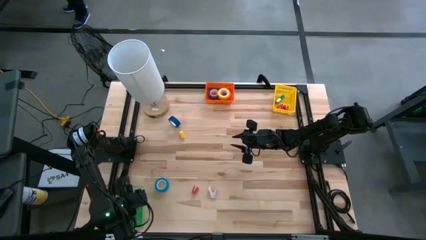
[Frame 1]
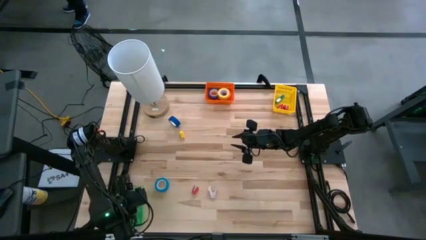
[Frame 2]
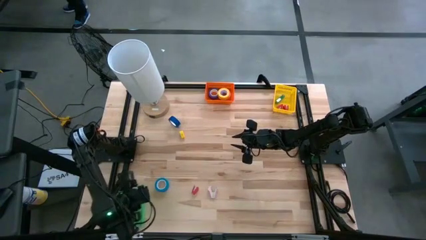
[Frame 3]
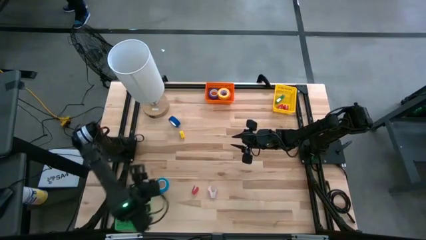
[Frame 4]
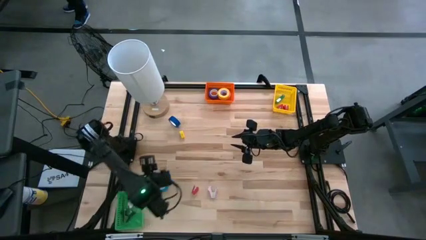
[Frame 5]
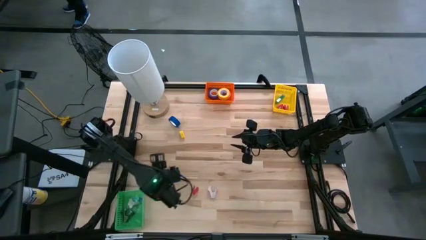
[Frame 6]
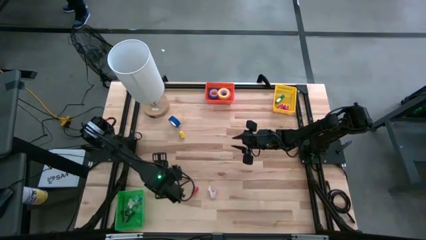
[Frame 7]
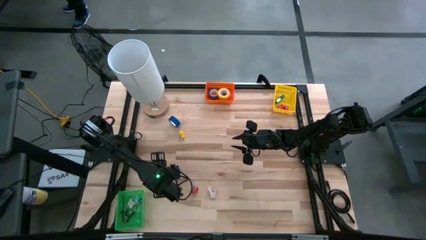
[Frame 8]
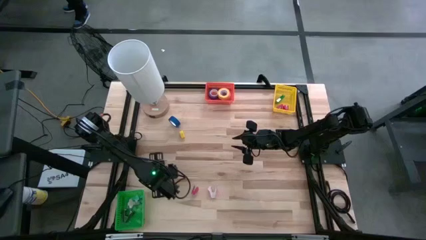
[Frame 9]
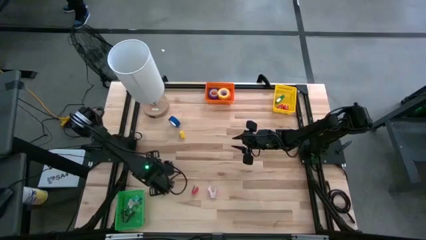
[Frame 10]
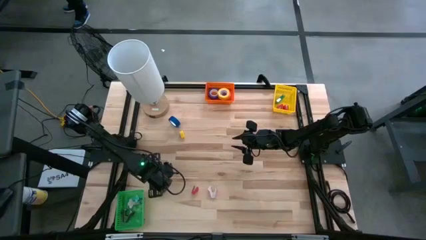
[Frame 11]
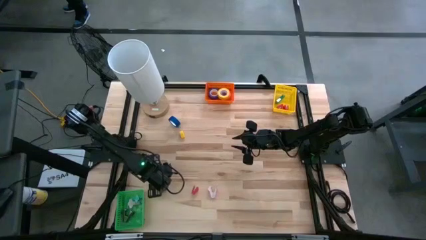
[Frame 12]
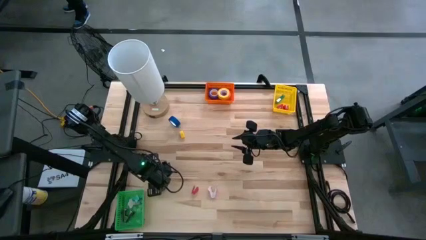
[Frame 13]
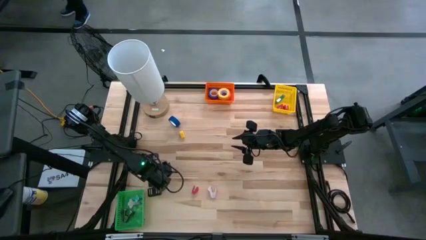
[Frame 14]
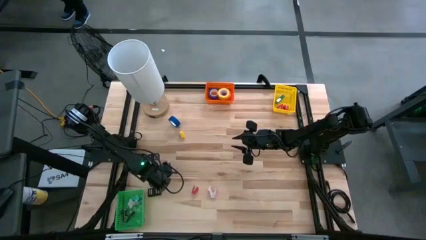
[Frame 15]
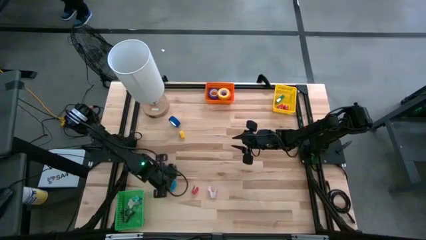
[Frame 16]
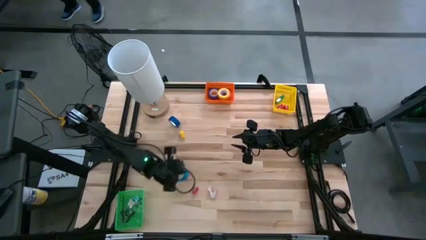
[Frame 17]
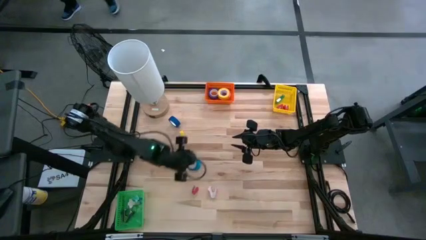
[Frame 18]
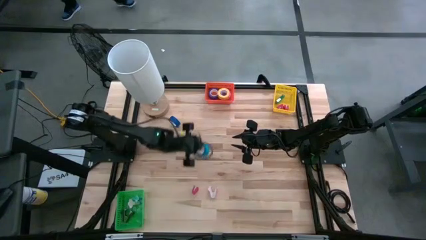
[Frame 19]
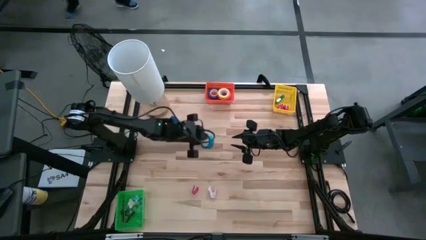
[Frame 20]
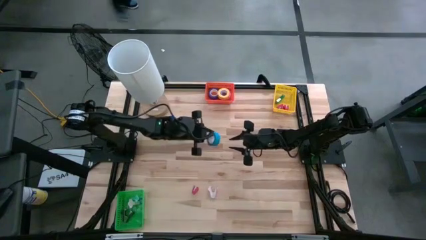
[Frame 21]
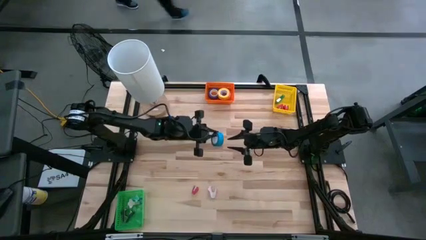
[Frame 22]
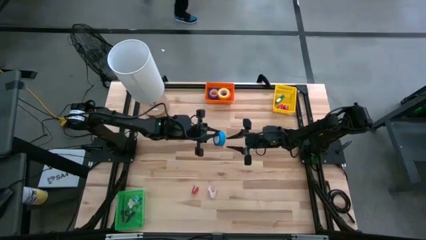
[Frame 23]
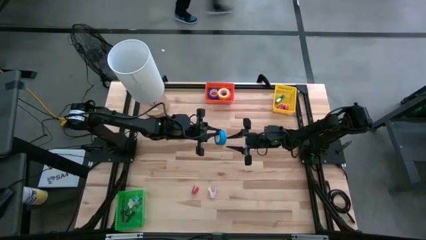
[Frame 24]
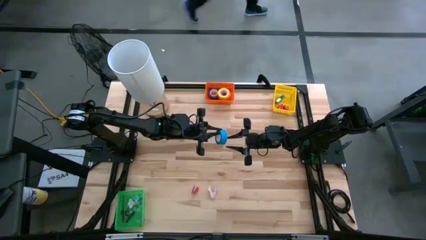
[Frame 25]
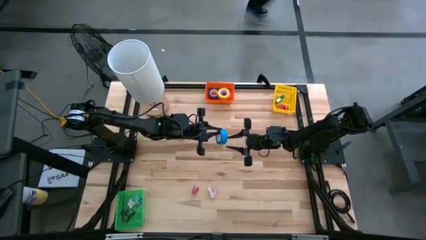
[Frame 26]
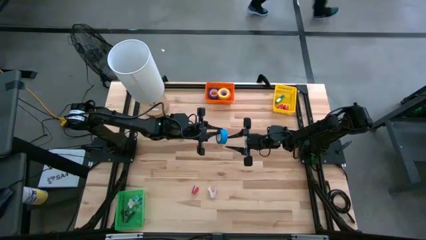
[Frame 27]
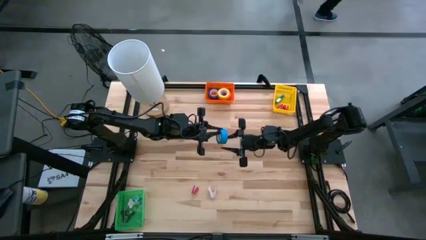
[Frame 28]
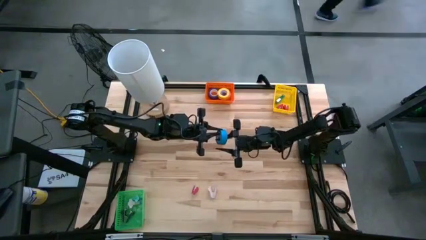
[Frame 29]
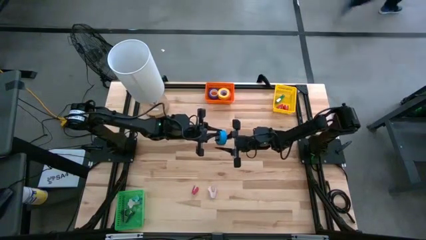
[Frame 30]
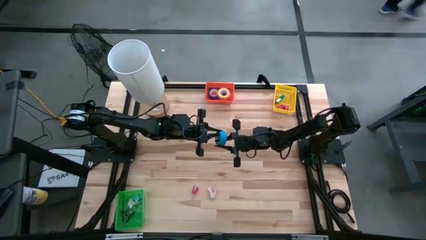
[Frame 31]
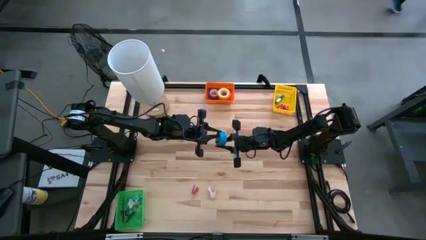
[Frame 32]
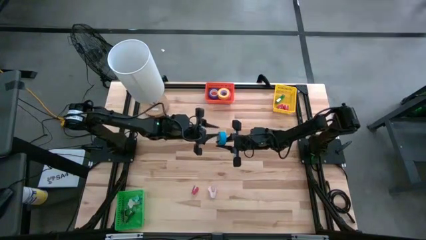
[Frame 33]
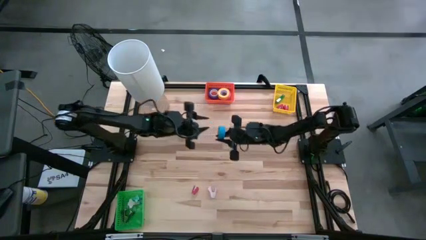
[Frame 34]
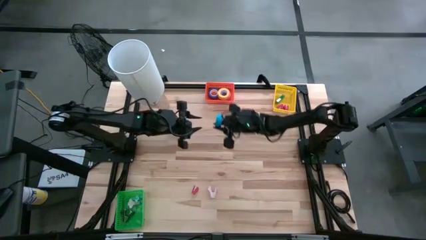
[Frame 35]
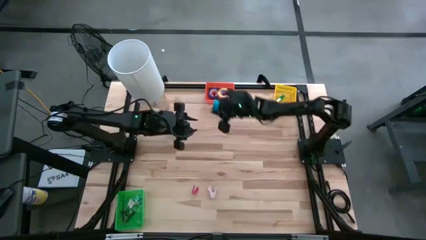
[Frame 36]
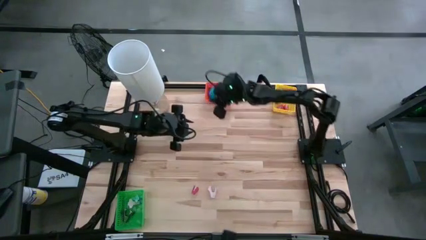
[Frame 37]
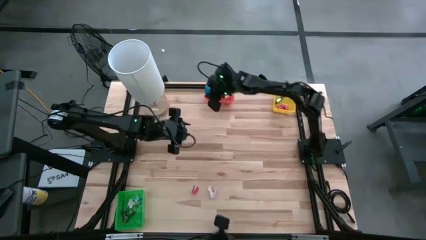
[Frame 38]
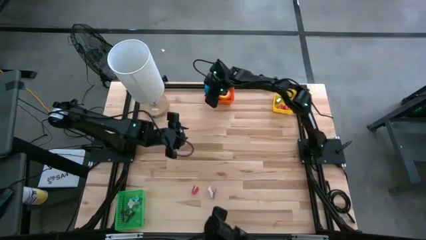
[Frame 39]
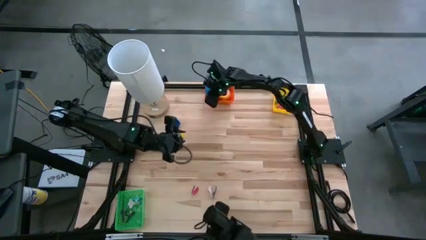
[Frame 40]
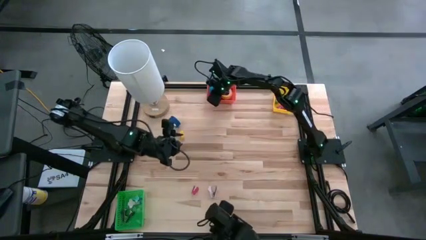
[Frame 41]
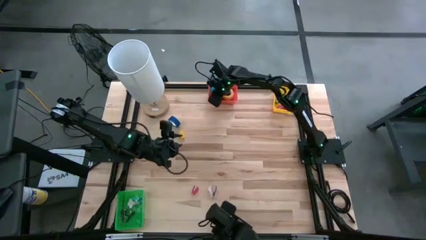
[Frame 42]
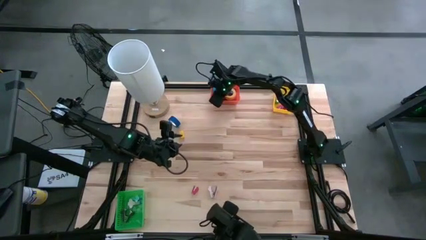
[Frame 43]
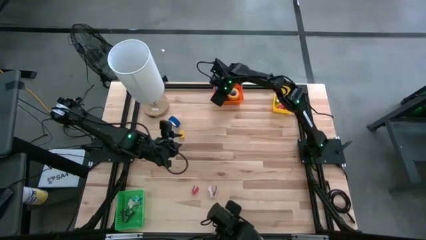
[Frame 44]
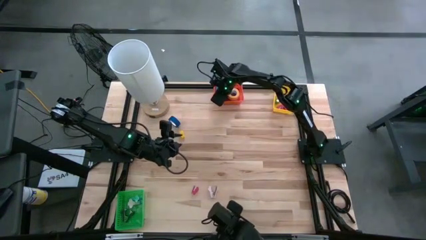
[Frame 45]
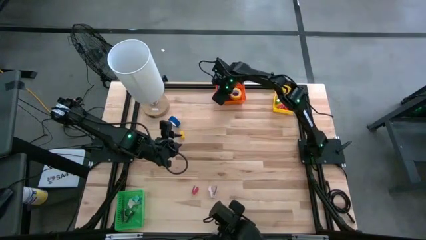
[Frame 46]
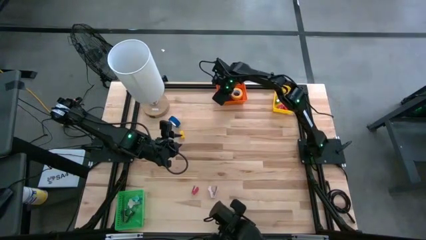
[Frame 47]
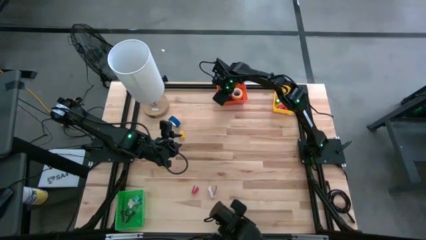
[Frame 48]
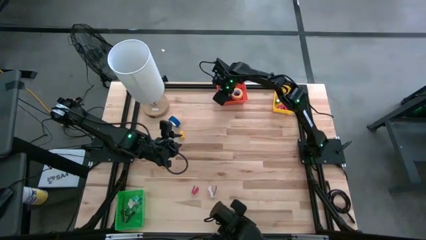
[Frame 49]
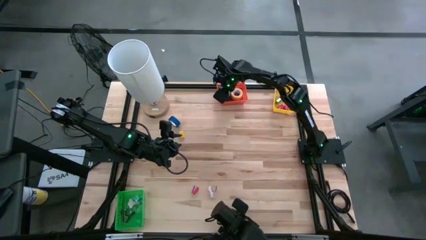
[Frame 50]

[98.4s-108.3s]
Task: Pick and place Stapler, Stapler remover, tape
Put the blue tape into the orange bin

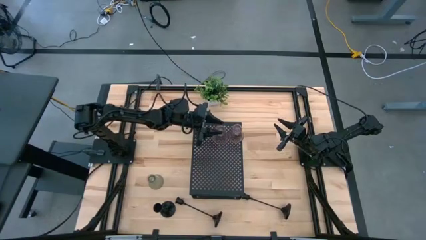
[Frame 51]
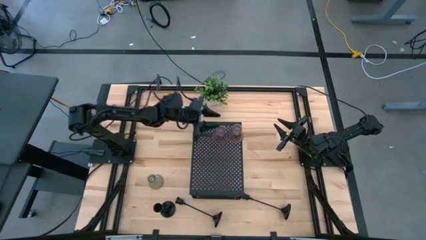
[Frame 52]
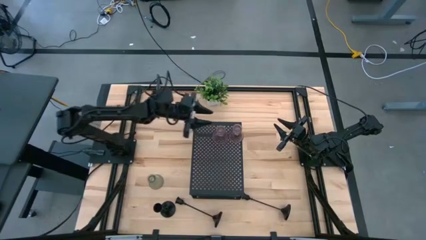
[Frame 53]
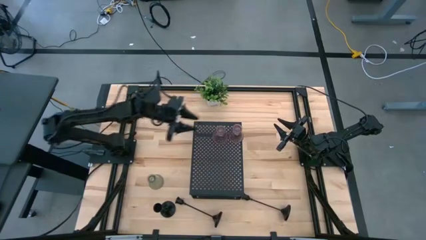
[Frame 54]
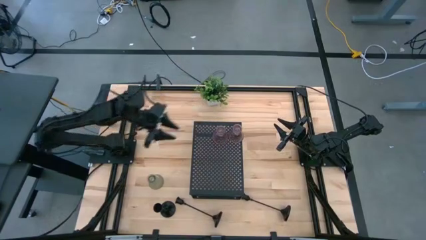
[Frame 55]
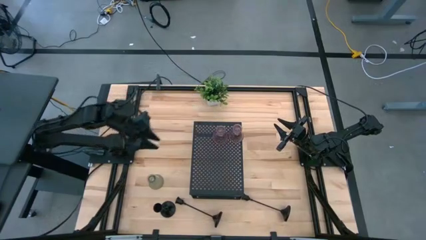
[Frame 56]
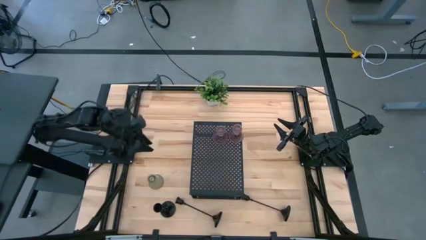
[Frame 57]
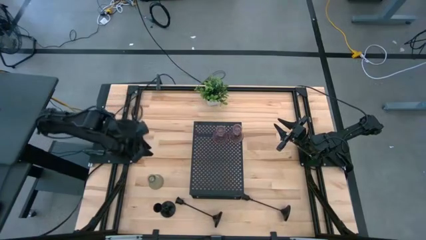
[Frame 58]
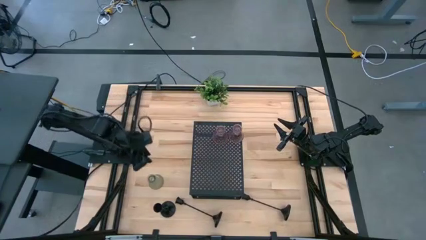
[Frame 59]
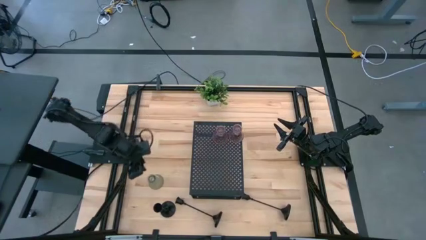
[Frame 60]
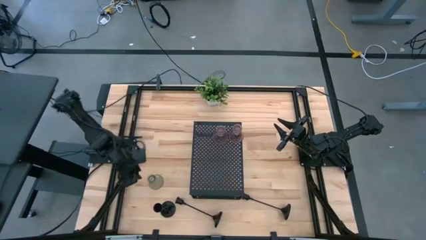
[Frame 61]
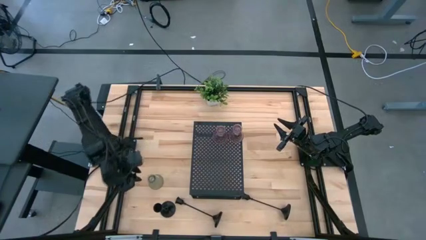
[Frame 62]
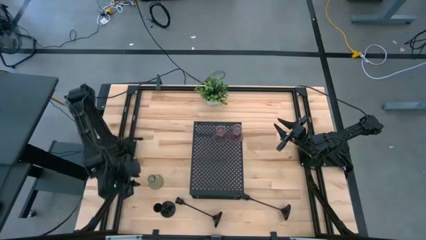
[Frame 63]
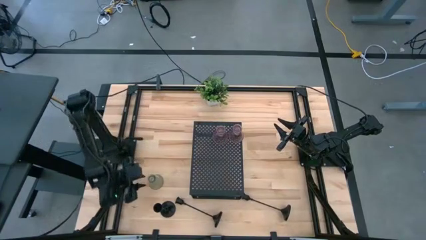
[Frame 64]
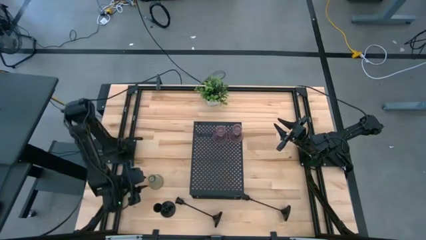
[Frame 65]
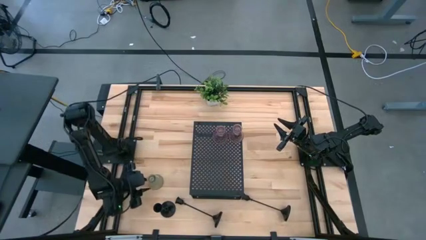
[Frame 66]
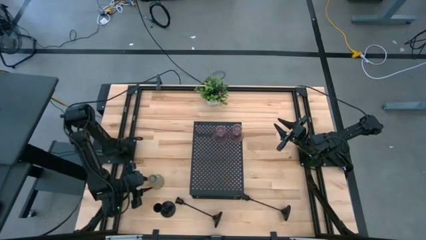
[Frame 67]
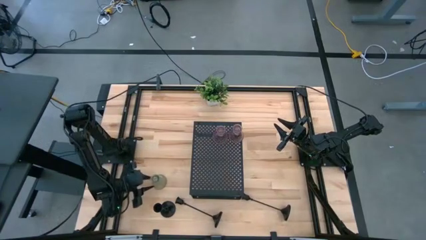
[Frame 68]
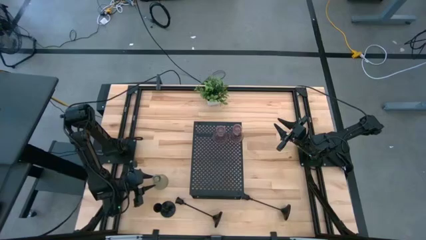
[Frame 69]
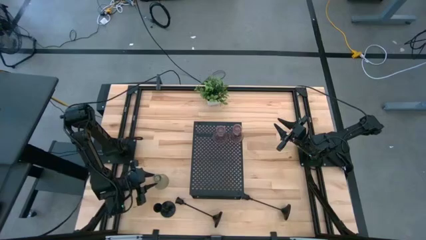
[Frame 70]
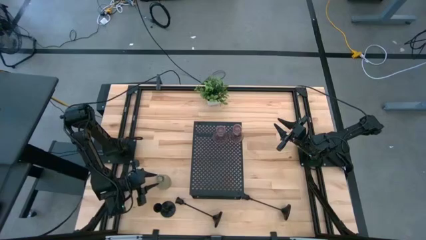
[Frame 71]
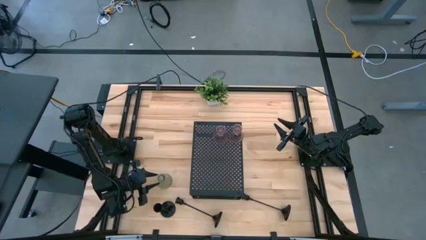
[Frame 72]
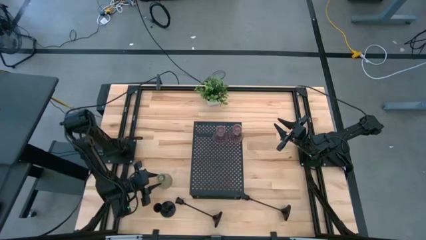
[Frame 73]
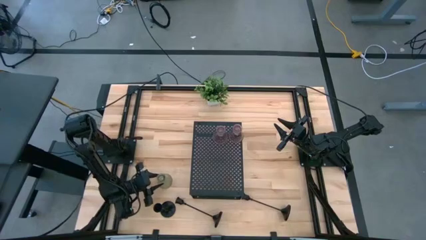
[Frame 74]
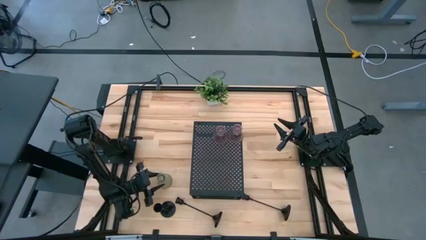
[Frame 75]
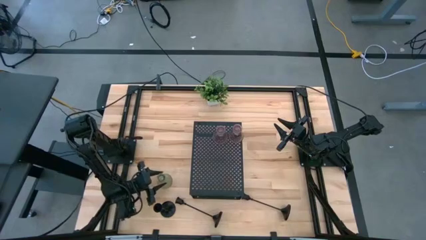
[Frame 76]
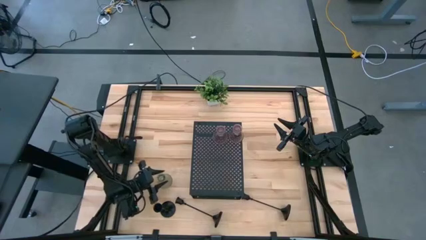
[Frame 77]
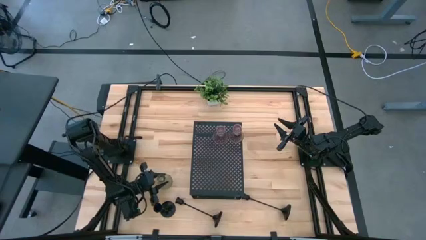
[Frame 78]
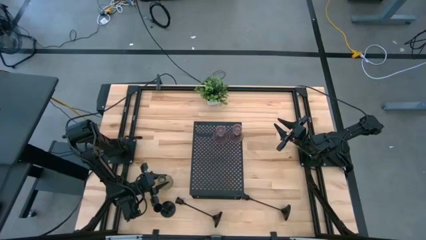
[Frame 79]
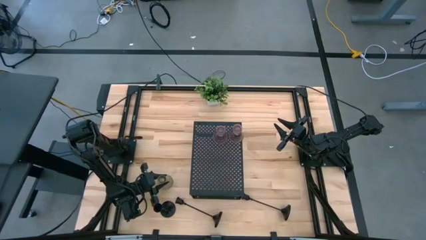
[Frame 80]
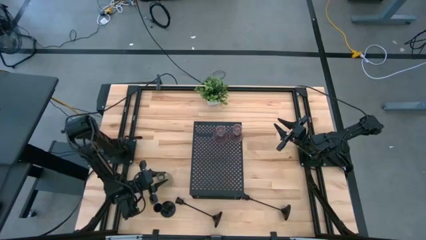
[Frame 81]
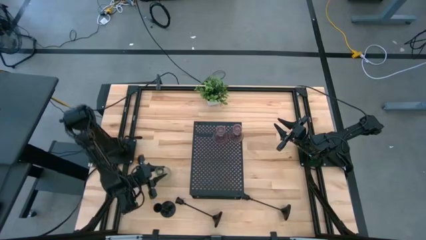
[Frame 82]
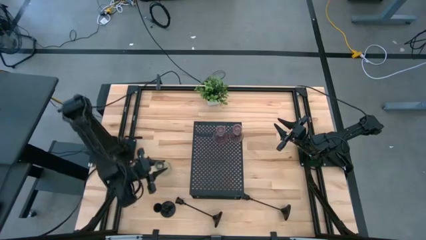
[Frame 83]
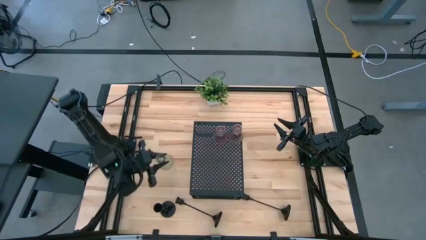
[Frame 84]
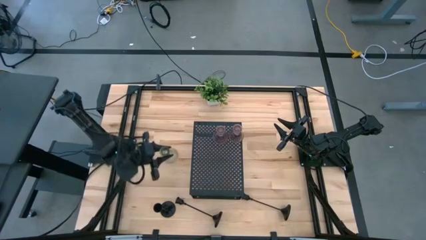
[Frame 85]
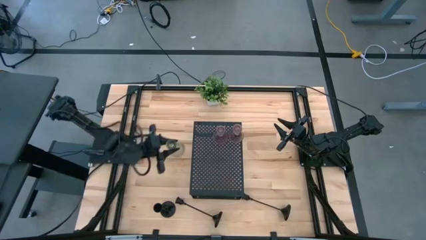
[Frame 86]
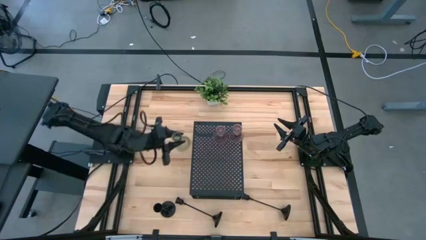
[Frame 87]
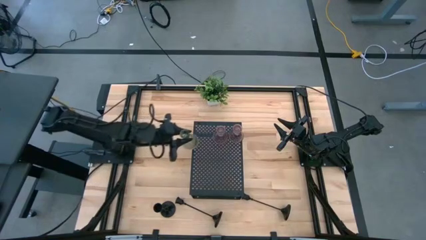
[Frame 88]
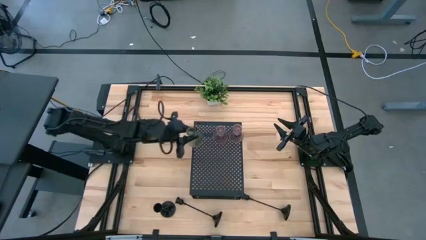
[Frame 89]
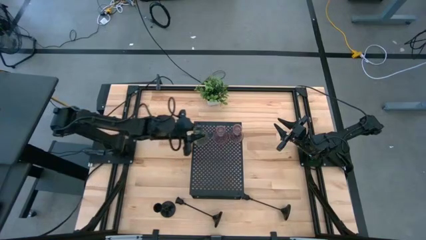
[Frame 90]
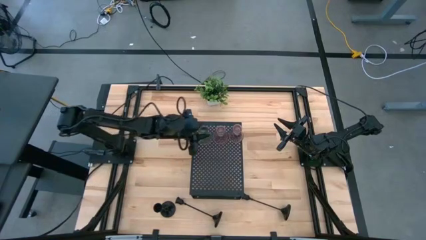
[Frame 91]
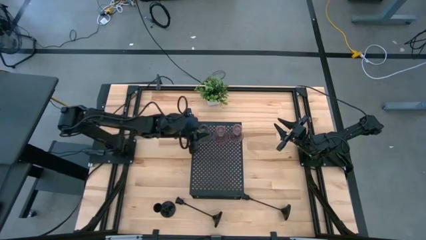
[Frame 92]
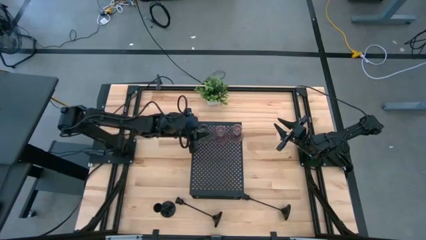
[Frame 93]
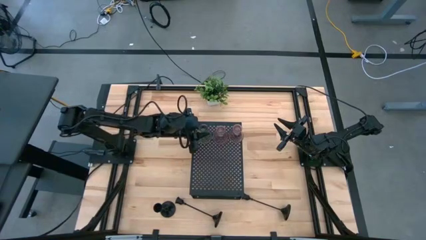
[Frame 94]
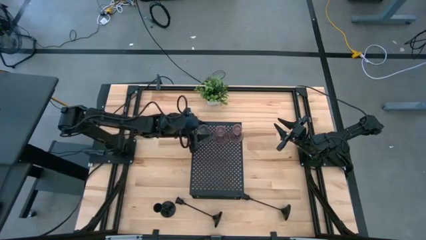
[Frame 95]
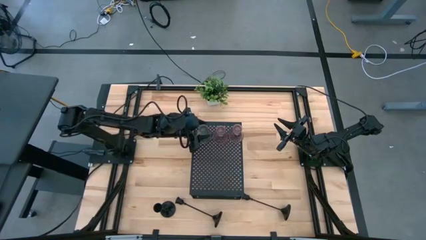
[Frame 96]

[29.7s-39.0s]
Task: Pick & Place candle stick holders
Align the green glass candle holder with the purple glass candle holder on the shelf
